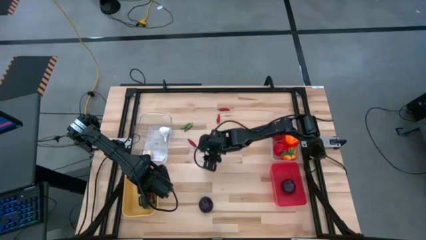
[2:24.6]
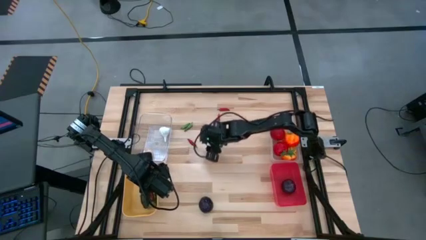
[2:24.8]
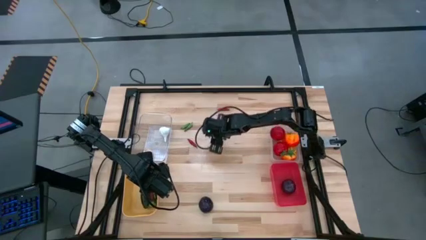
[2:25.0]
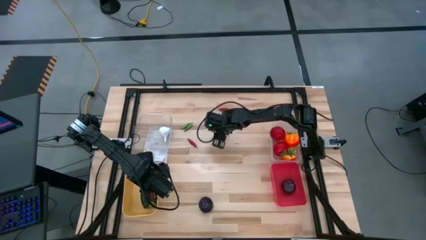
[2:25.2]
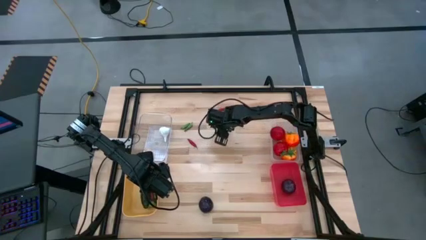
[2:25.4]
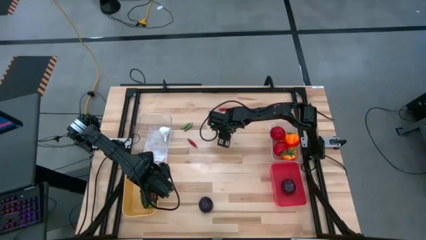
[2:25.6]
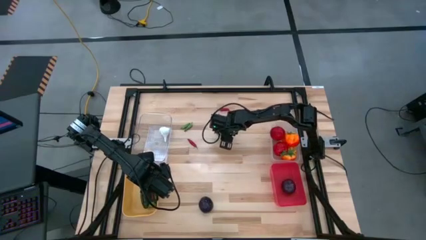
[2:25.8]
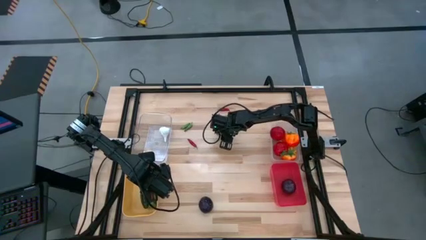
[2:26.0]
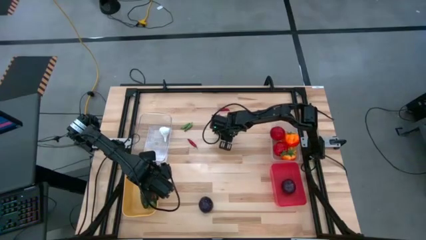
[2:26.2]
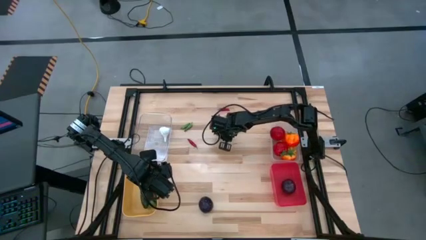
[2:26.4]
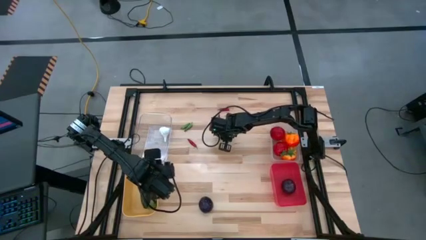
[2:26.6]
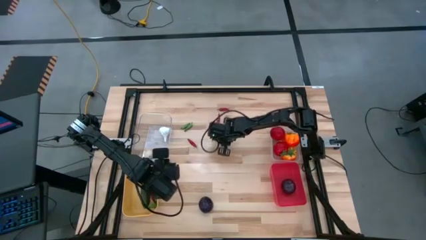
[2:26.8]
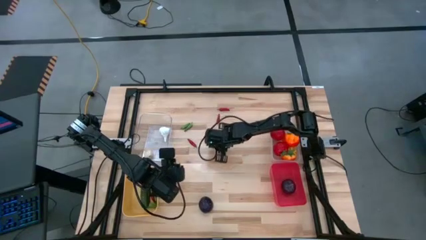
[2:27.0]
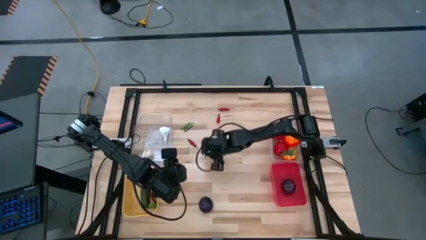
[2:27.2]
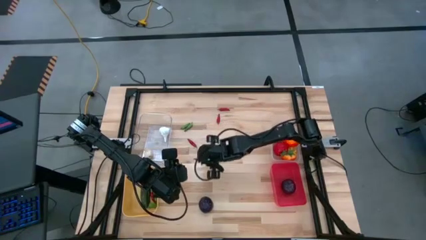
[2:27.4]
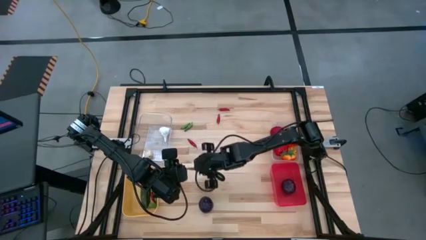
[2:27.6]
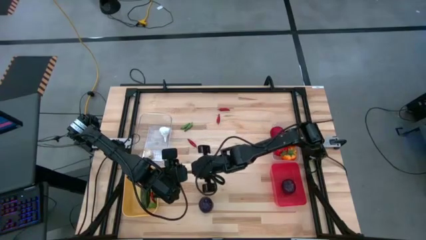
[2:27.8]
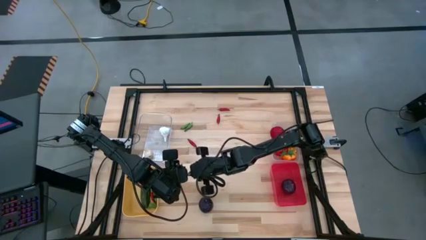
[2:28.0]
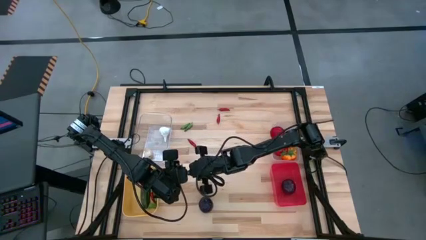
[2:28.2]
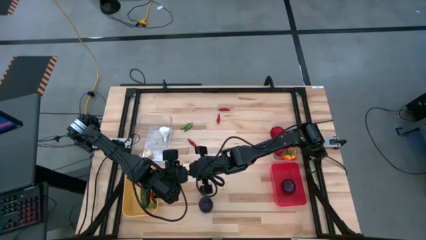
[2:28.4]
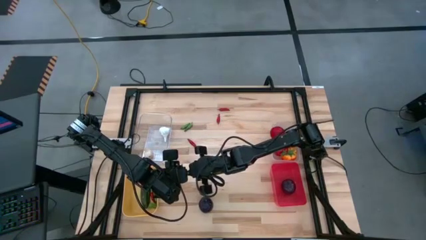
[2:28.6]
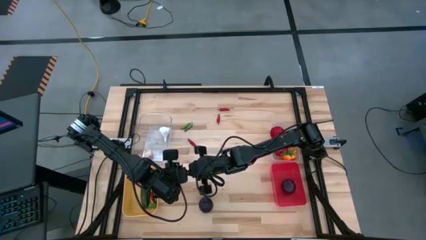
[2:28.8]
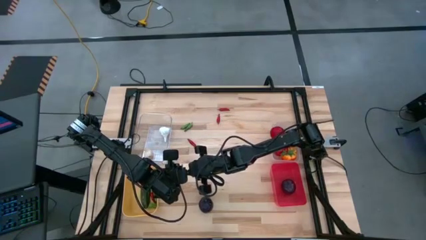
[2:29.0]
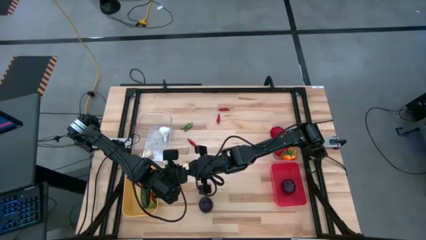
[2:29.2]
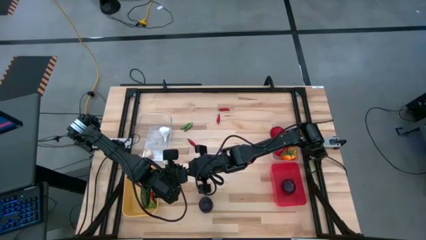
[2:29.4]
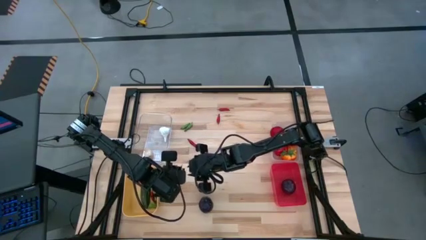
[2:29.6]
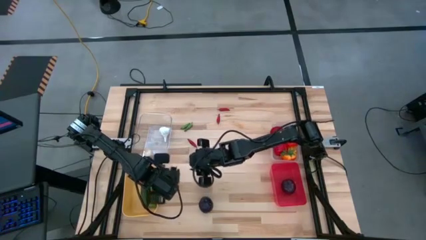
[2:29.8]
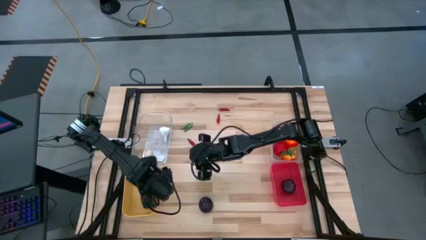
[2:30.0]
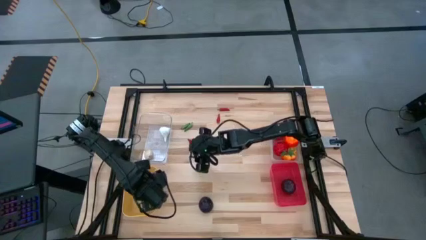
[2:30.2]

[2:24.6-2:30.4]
Task: Sort produce into baskets
Put the green chili pepper into the yellow bin

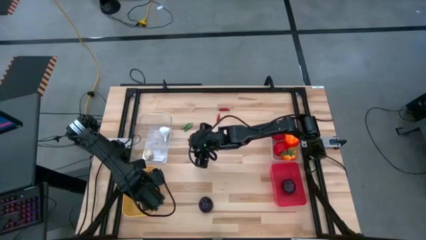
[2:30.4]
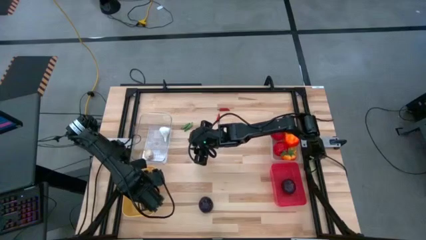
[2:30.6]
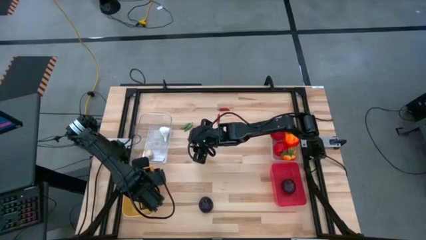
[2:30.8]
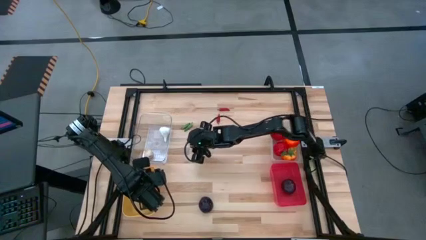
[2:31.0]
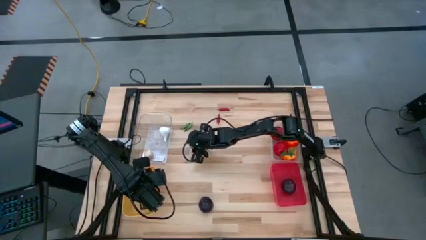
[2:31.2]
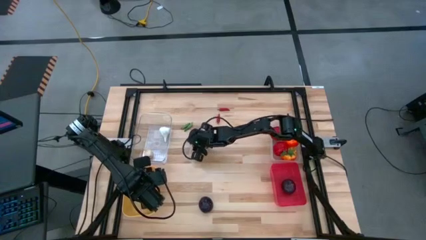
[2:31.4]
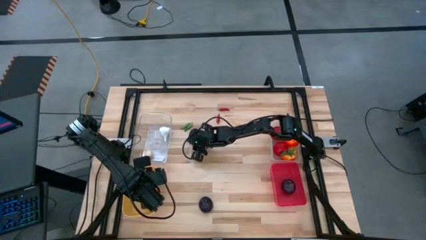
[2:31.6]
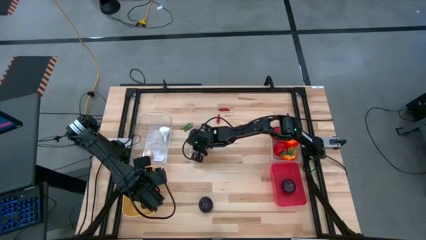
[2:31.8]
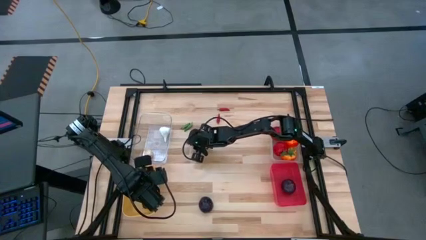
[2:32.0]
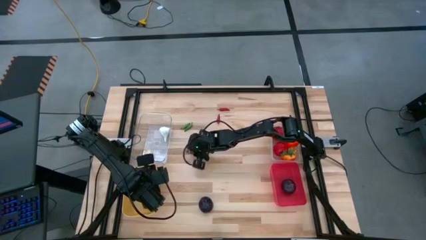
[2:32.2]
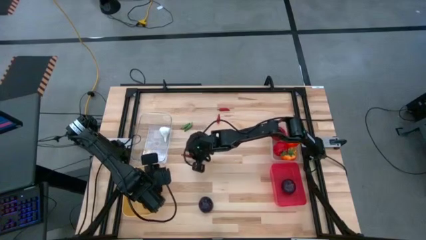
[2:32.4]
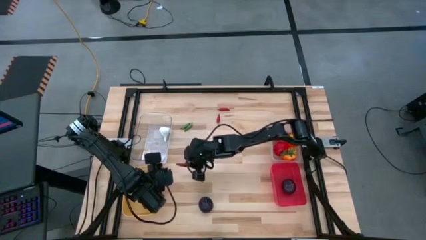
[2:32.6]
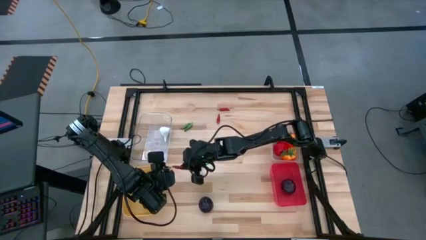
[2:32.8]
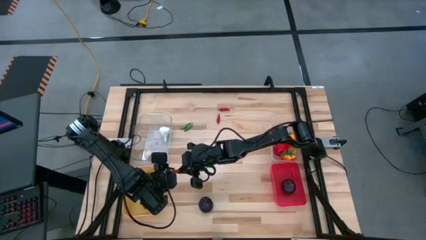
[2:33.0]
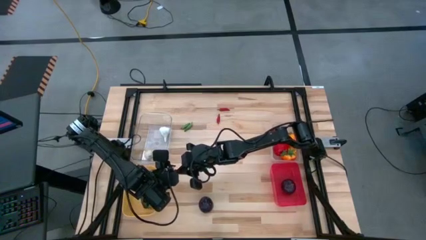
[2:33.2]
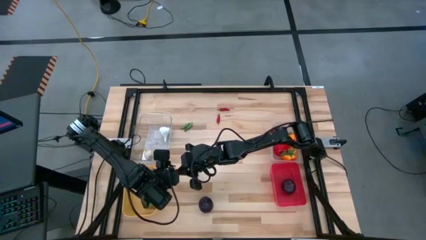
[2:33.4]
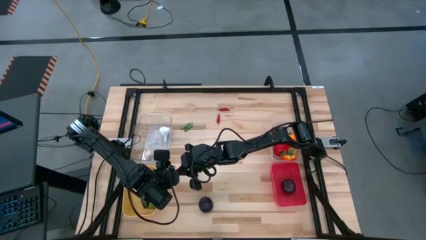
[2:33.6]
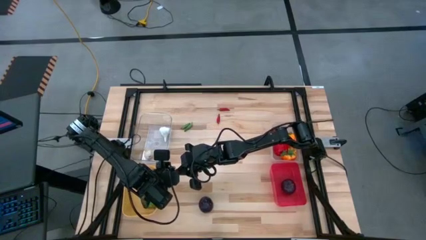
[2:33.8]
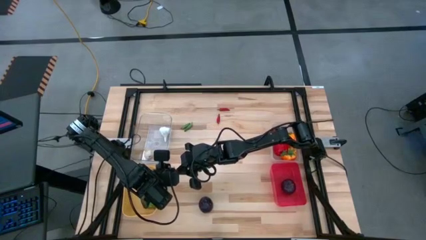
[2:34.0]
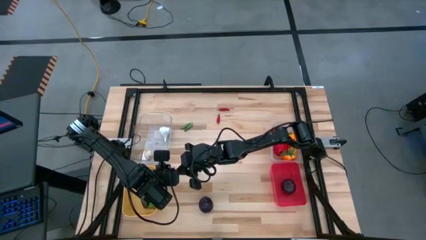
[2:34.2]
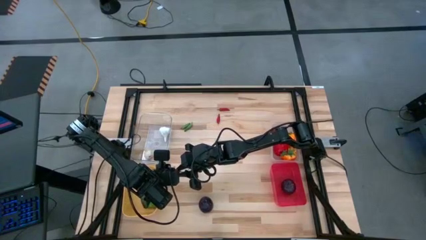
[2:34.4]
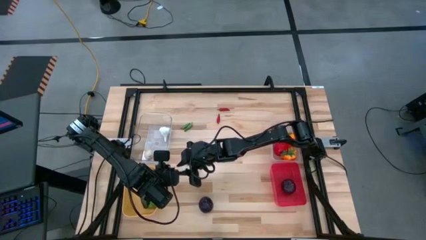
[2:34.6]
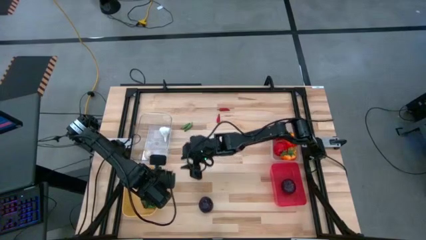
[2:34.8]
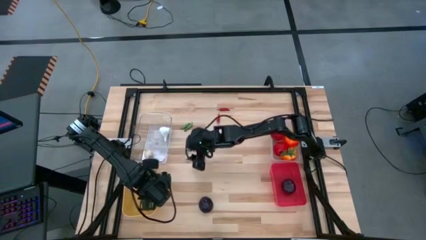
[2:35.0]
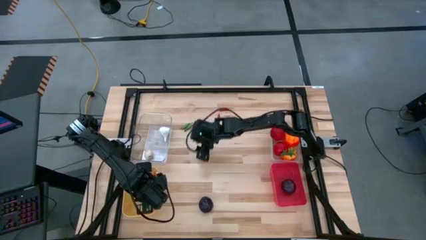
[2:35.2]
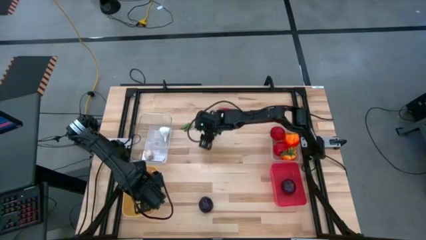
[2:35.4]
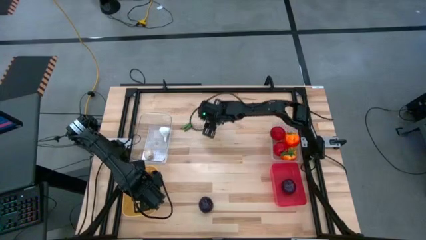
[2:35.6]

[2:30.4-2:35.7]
Put the red chili pepper into the yellow bin

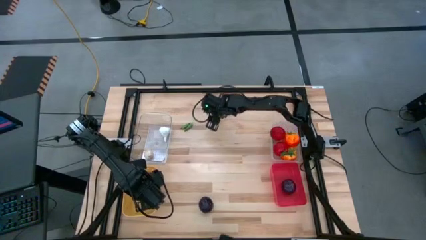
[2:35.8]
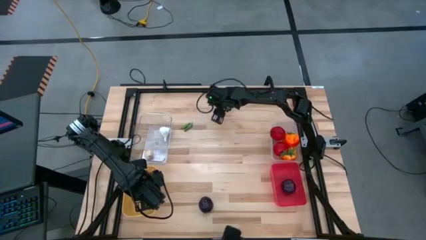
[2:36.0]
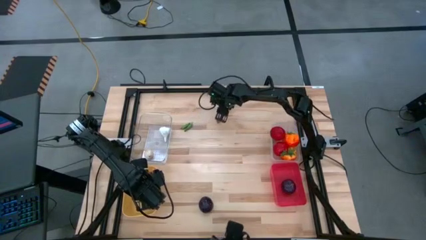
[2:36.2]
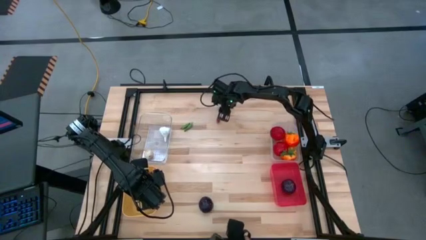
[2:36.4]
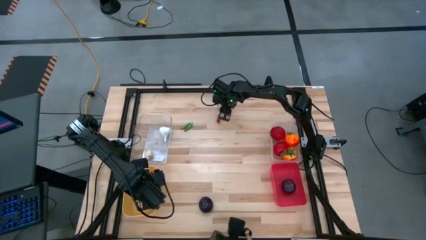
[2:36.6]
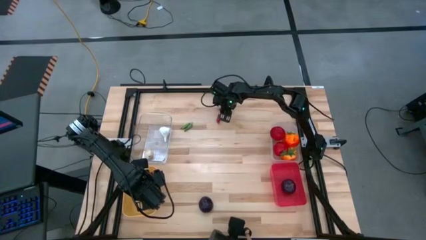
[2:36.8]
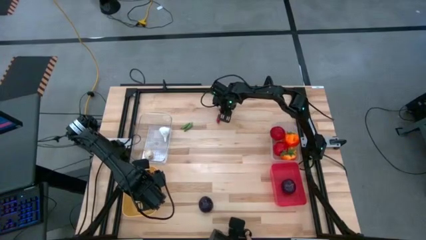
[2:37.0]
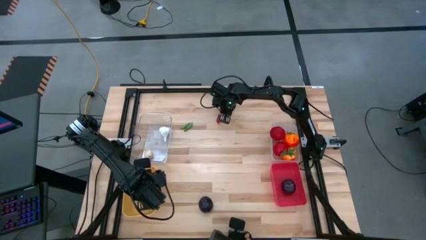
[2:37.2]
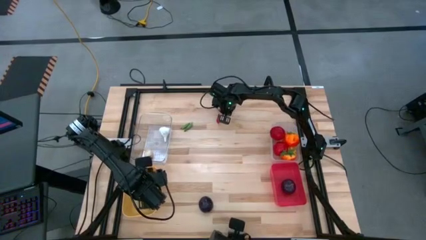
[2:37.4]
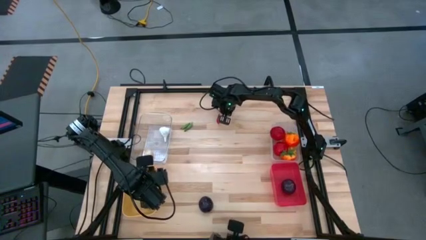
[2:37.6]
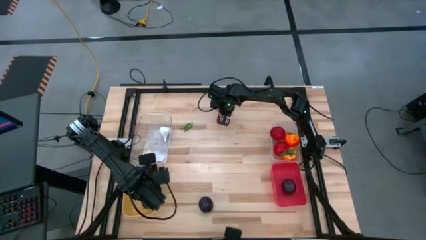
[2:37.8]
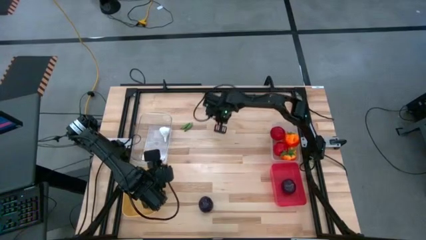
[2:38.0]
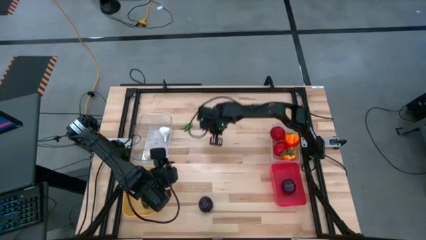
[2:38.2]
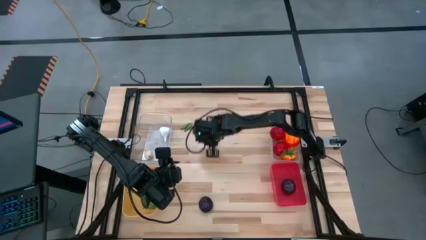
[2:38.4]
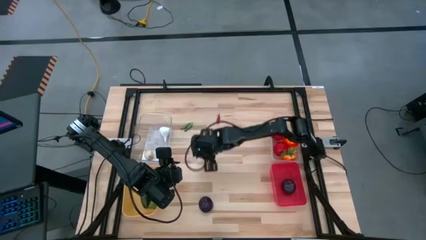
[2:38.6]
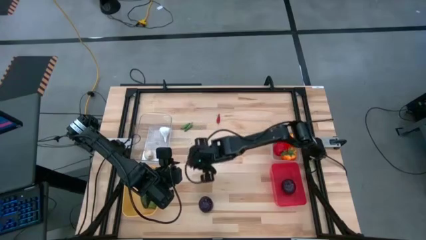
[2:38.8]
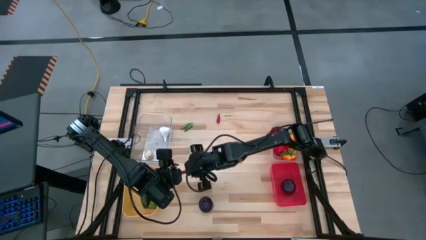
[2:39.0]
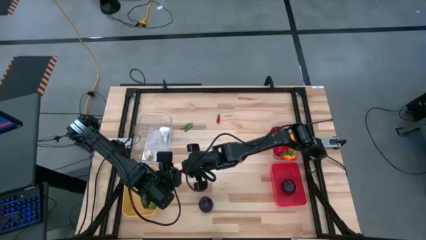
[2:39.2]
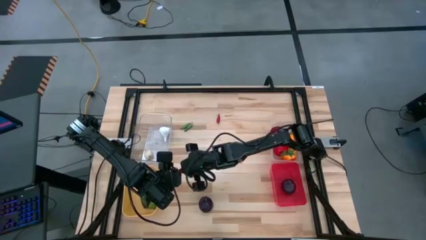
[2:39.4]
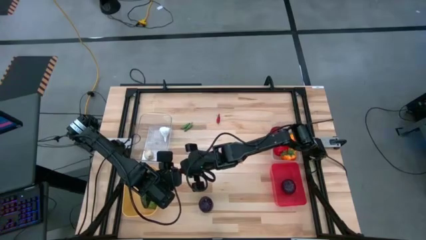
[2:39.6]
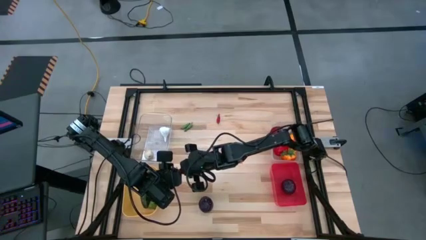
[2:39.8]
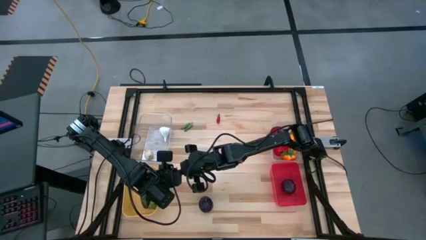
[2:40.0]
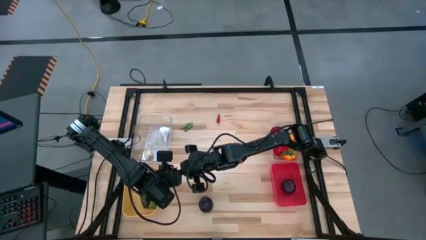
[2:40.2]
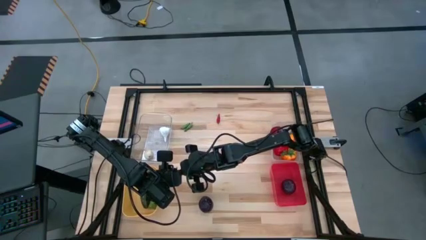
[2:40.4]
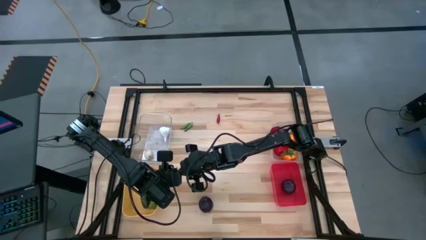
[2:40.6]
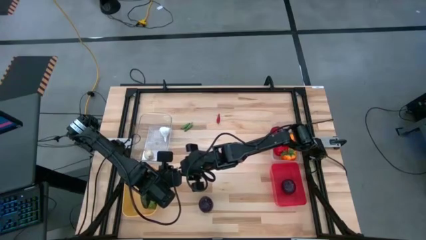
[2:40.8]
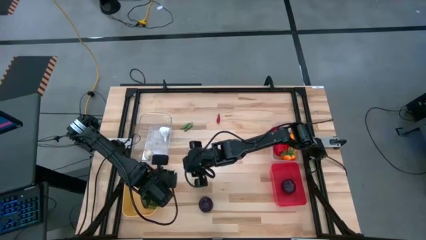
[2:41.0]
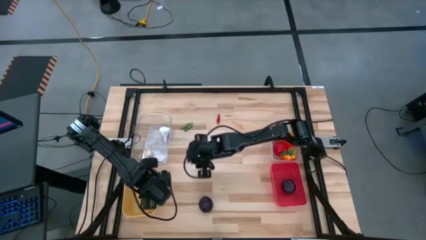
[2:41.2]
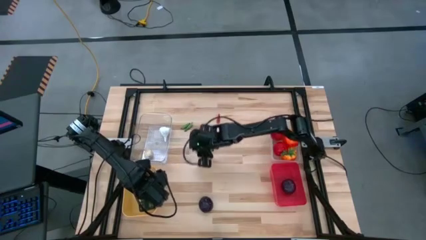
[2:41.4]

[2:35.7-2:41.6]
Put the red chili pepper into the yellow bin
